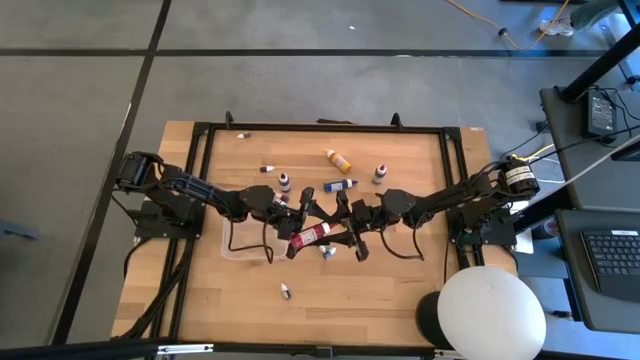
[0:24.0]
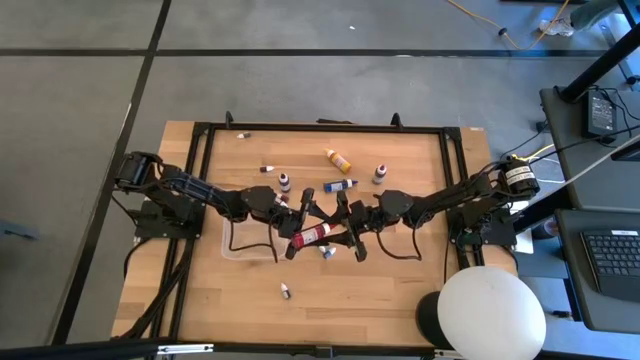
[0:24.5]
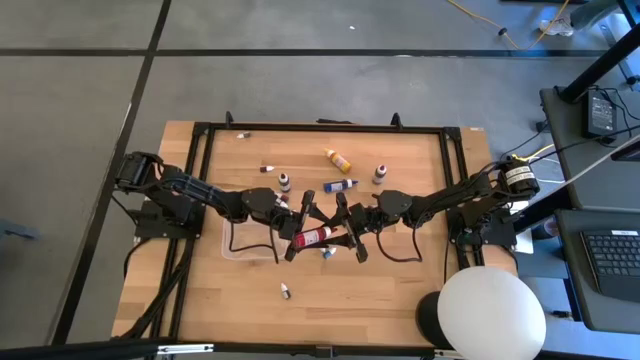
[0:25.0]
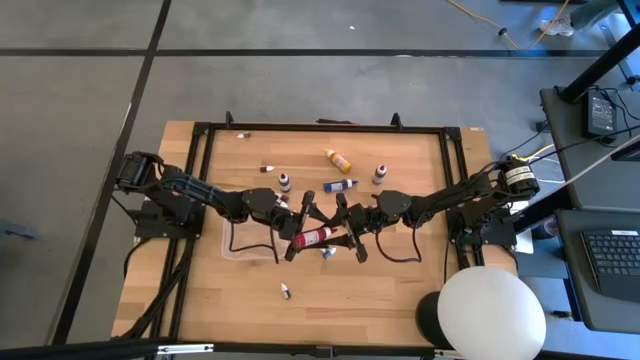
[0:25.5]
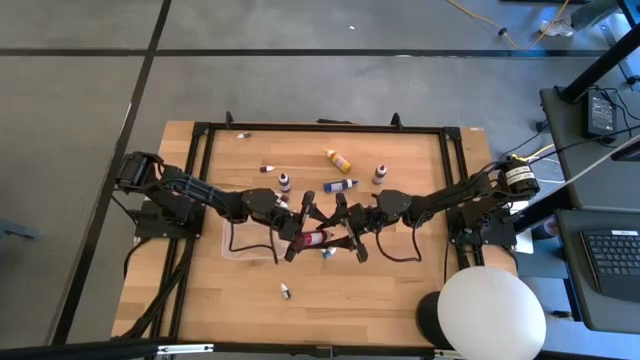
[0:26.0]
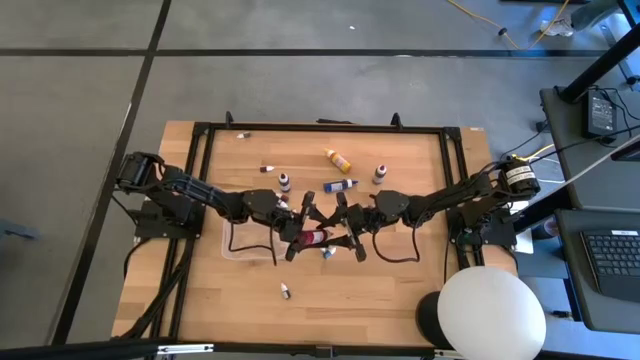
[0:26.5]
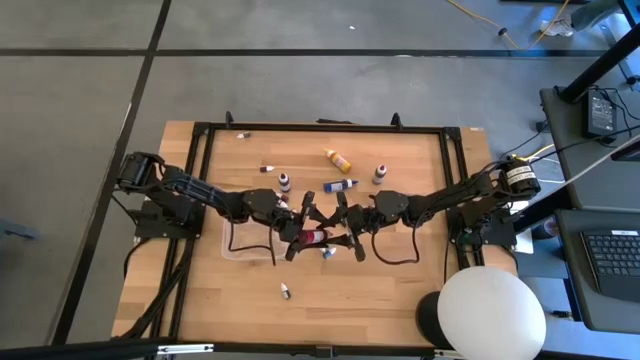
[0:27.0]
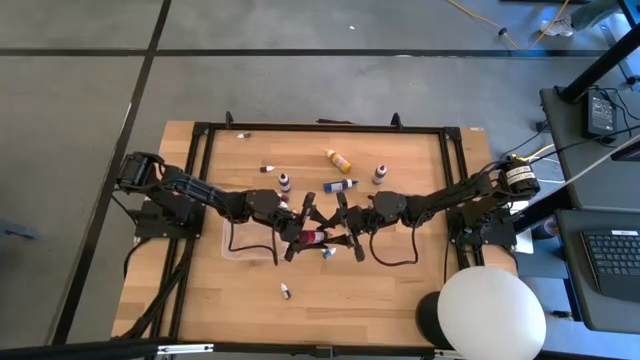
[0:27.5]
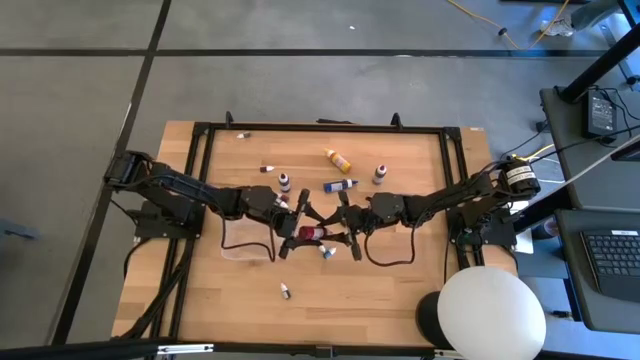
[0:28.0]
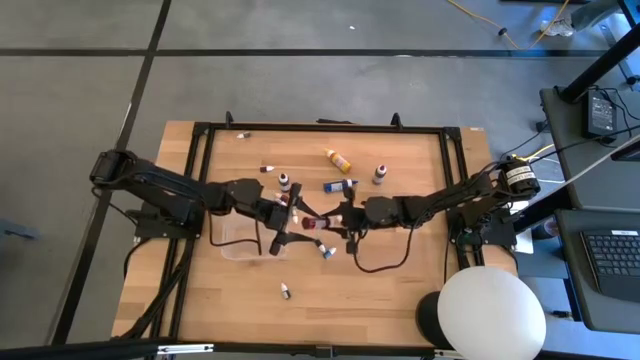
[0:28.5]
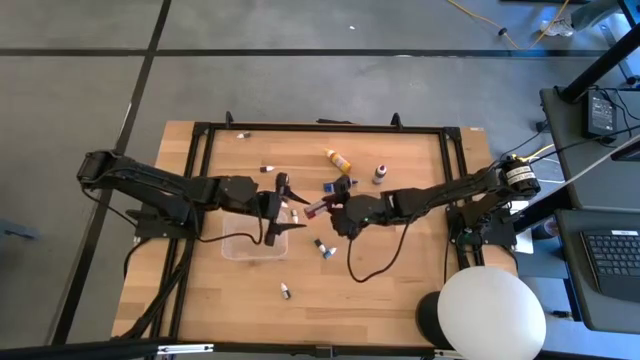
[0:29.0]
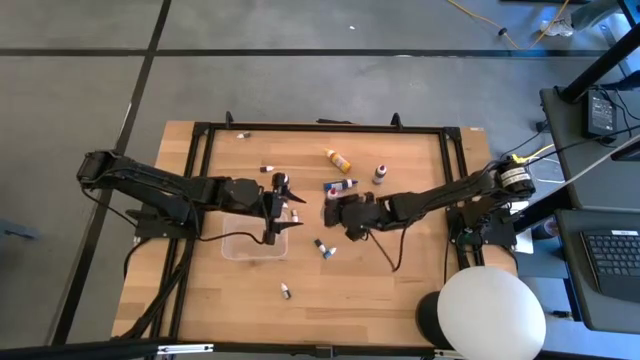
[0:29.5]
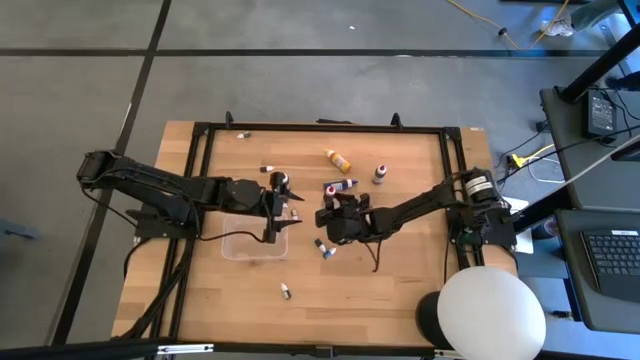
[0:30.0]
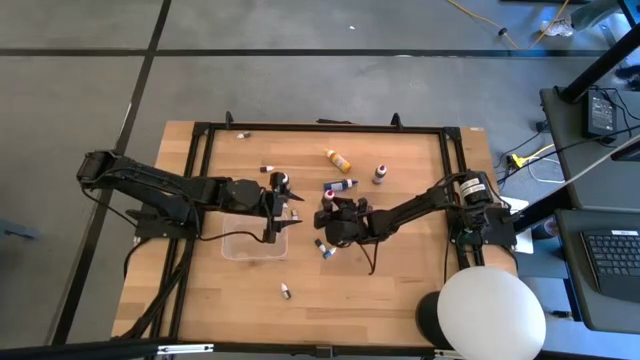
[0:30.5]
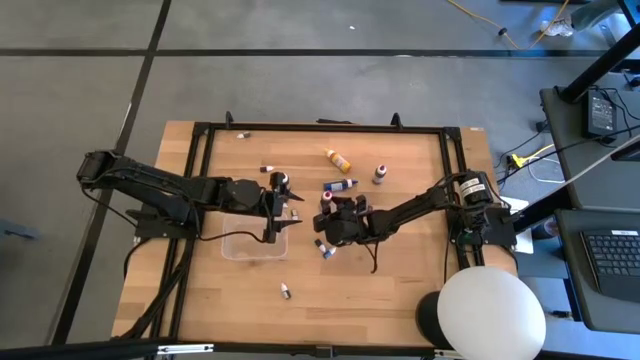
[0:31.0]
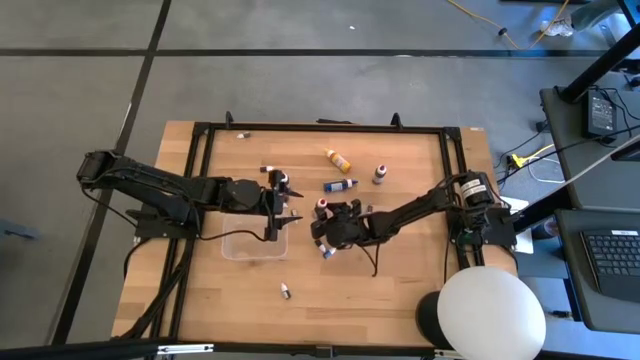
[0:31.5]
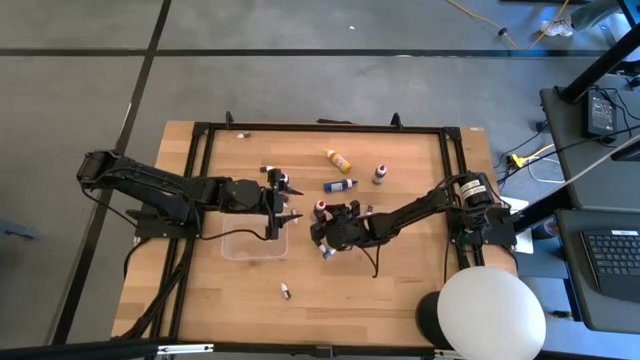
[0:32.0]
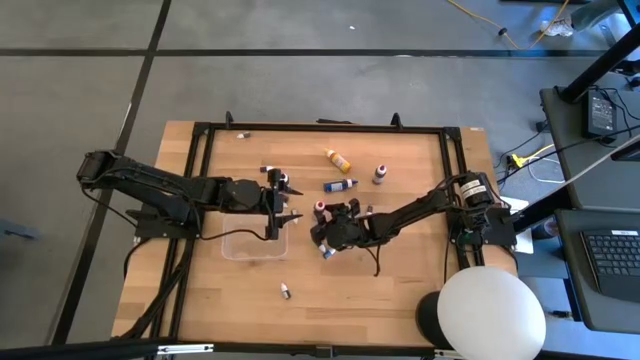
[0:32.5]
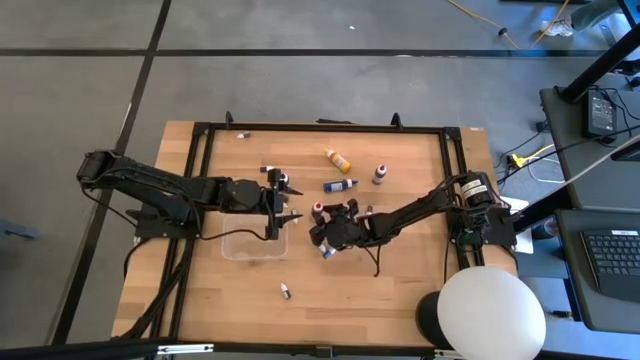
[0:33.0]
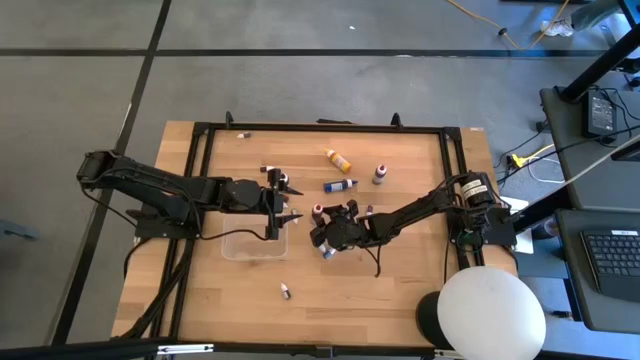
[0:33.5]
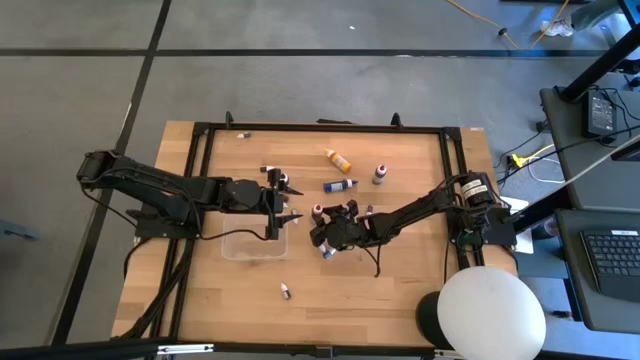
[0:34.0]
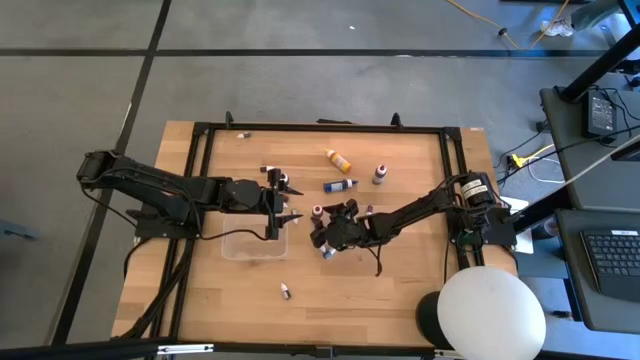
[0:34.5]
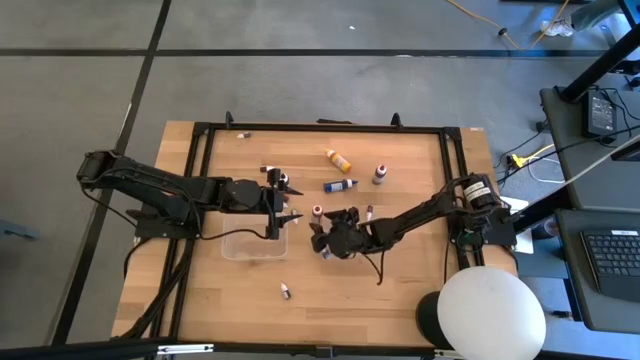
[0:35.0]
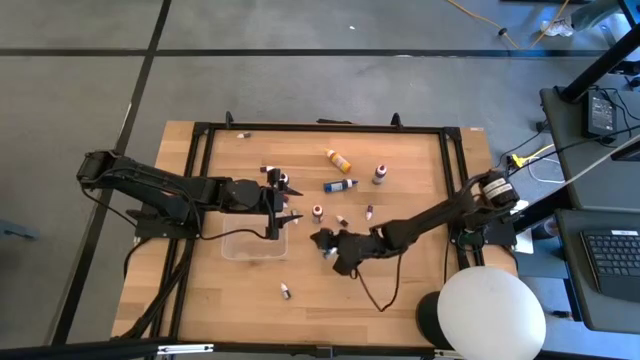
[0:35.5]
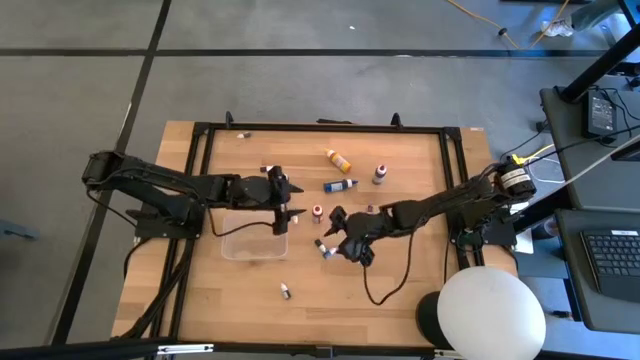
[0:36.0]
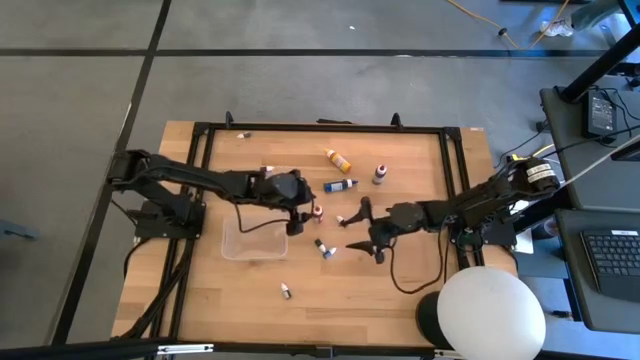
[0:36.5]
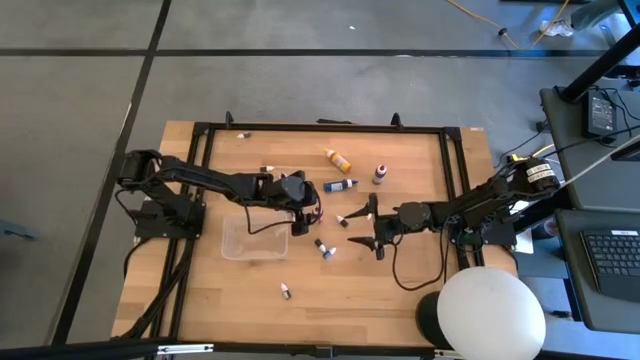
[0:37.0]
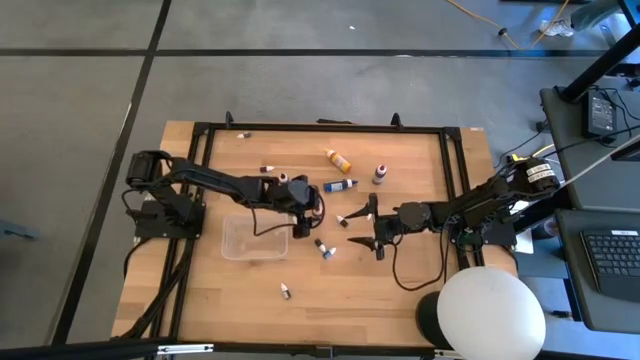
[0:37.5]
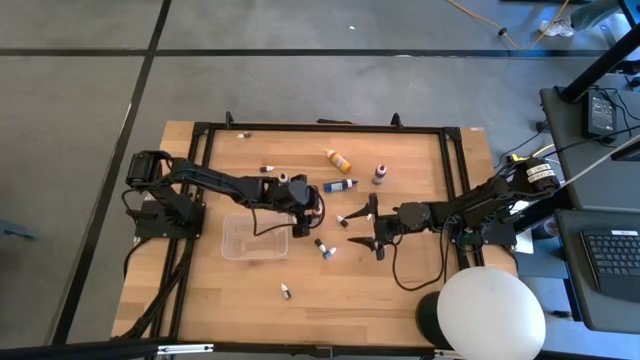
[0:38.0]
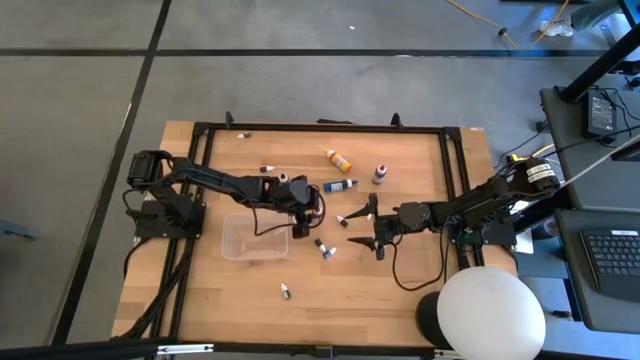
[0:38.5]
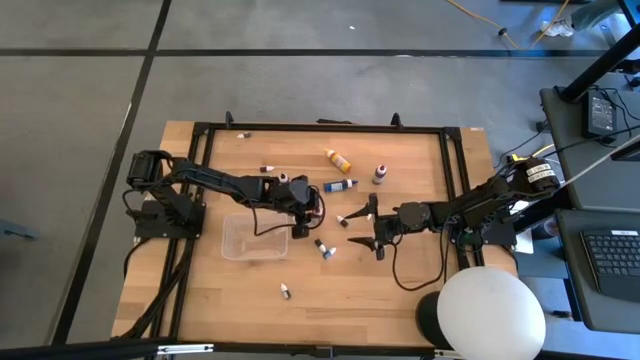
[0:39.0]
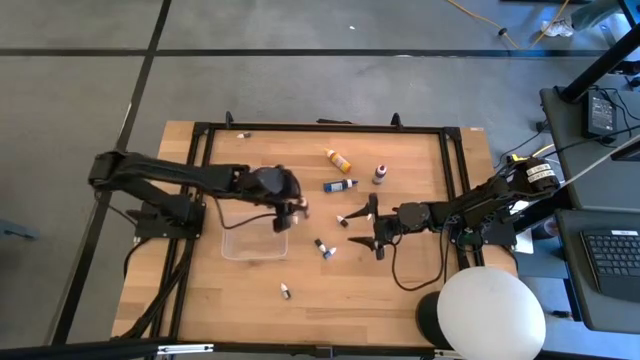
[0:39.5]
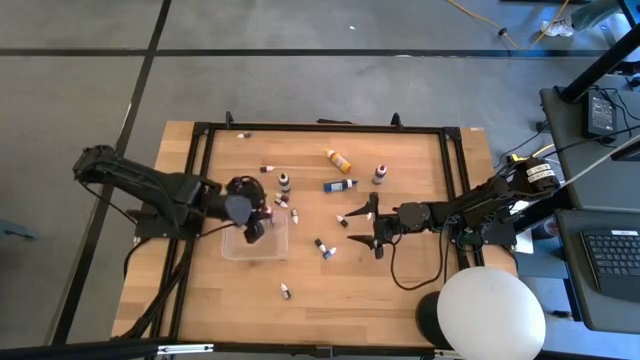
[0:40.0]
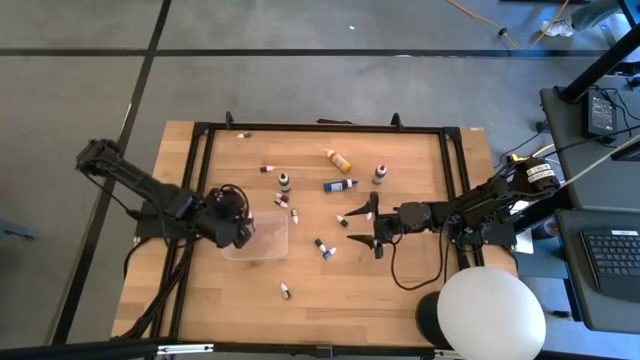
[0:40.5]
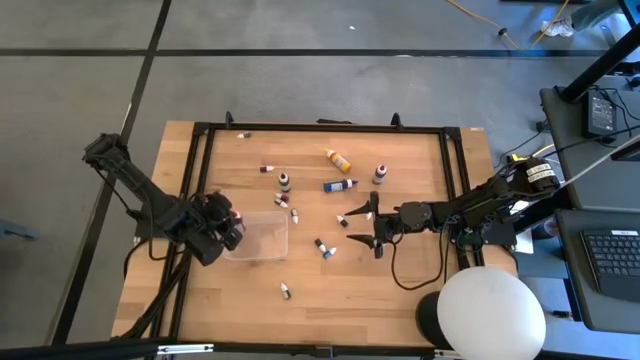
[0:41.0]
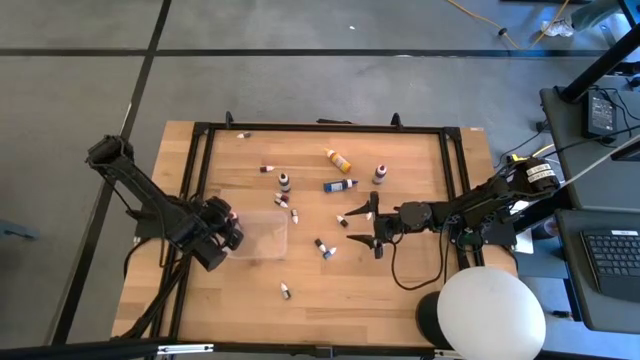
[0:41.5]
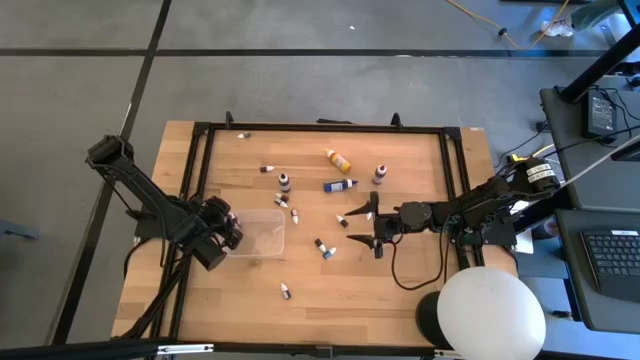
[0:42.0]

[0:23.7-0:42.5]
Task: Pick & Place food coloring
Put the large red food coloring bottle into the transparent bin

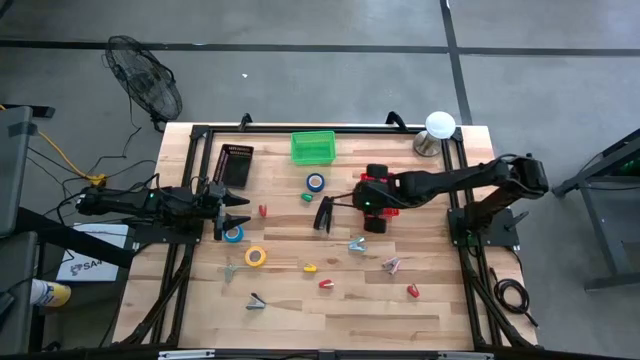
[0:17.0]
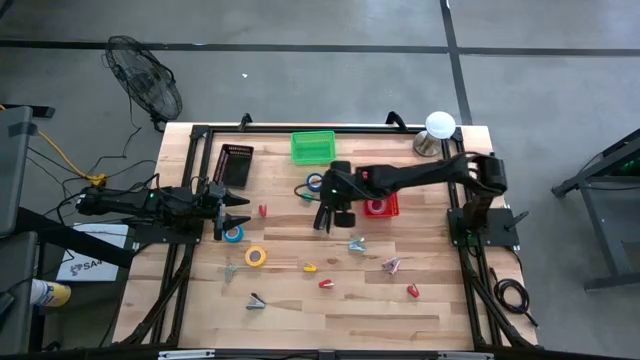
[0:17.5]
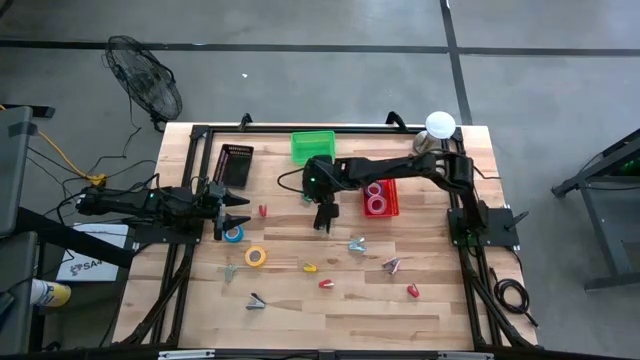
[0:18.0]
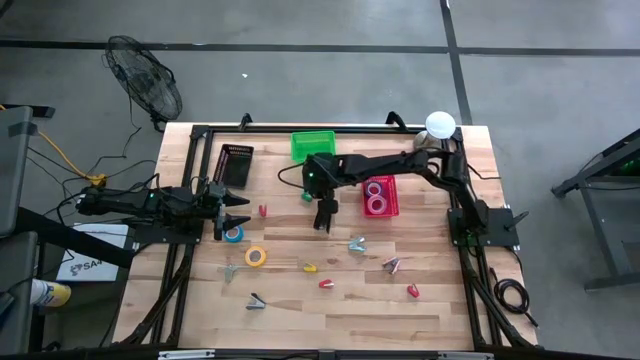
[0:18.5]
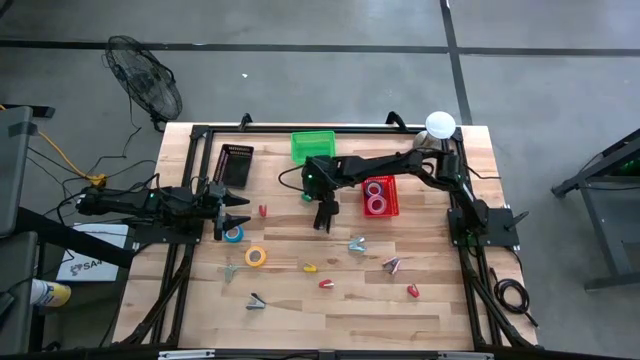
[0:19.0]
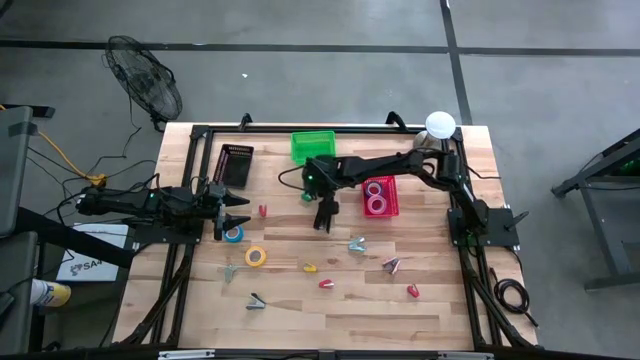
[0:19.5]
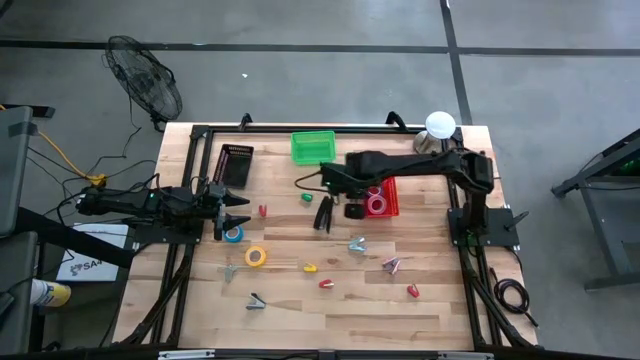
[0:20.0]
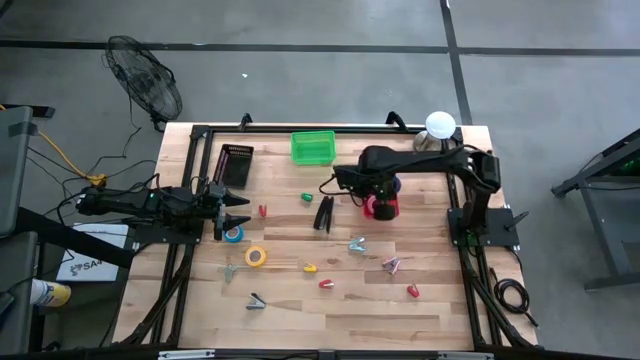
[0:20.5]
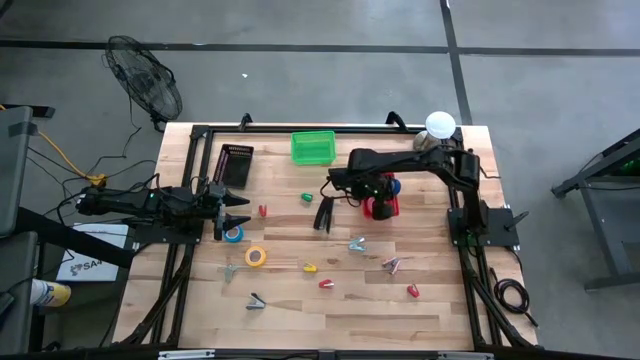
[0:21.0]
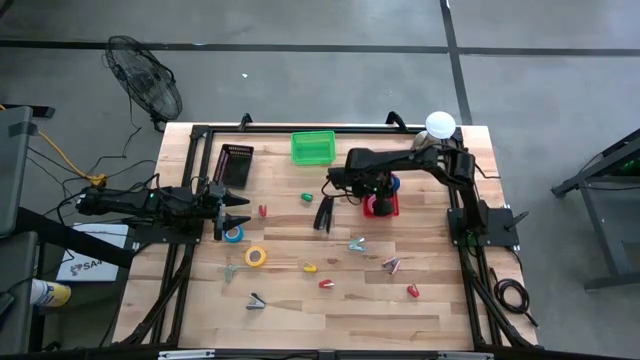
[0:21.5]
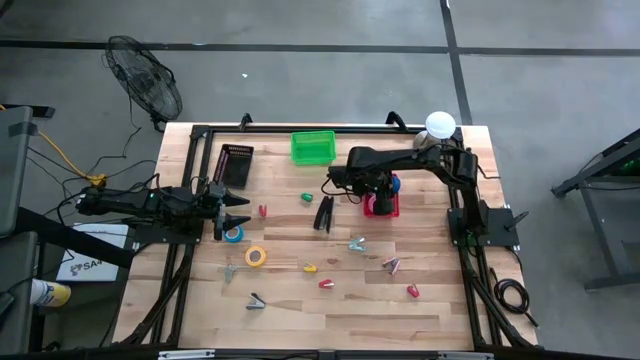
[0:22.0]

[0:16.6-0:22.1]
Task: Pick and place Stapler, Stapler remover, tape
Put the dark blue tape into the red bin
